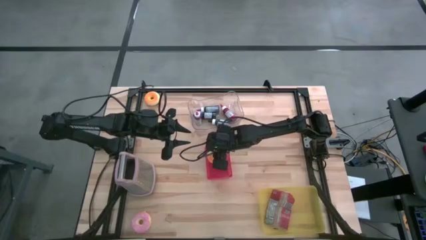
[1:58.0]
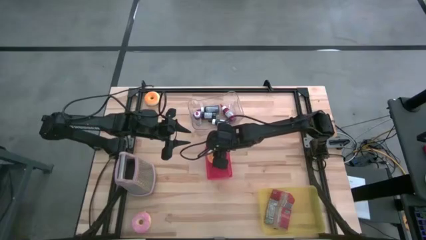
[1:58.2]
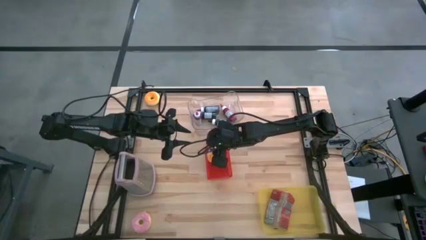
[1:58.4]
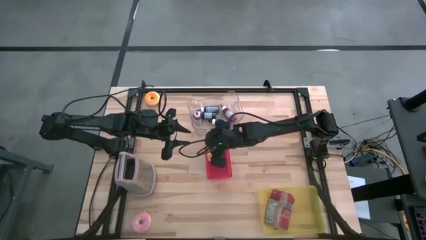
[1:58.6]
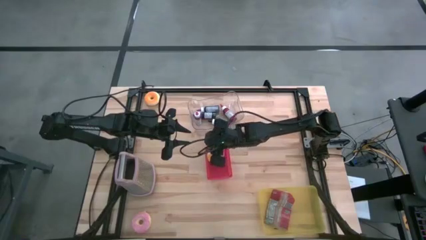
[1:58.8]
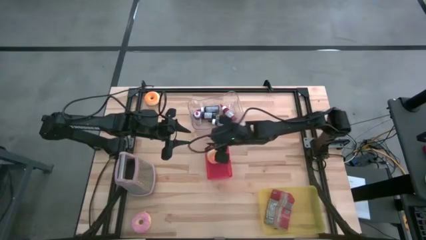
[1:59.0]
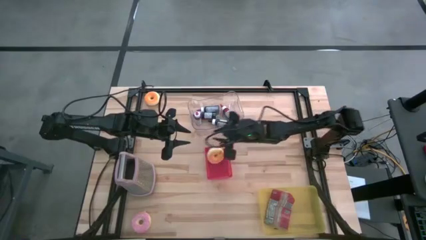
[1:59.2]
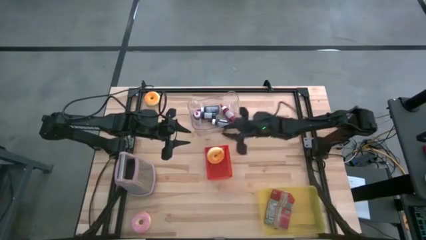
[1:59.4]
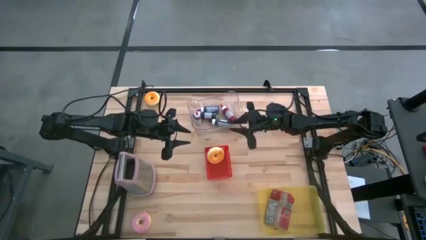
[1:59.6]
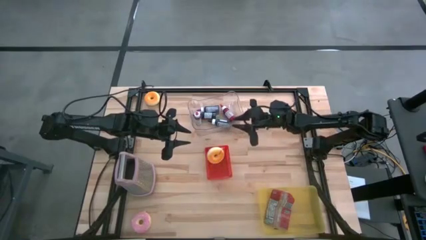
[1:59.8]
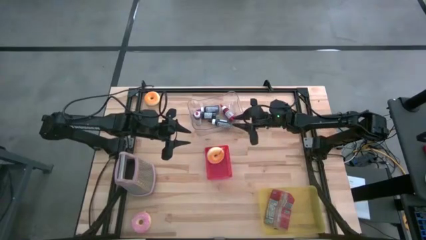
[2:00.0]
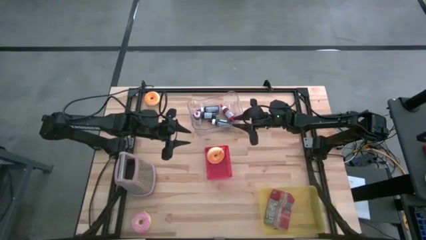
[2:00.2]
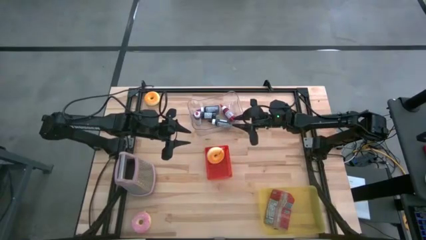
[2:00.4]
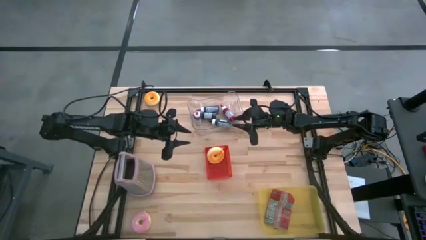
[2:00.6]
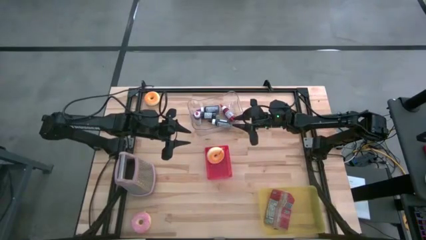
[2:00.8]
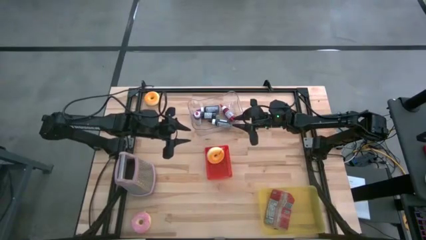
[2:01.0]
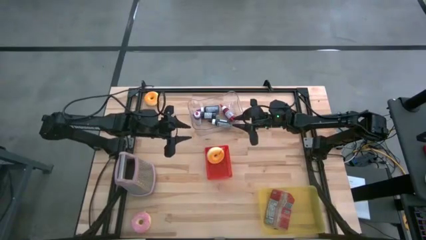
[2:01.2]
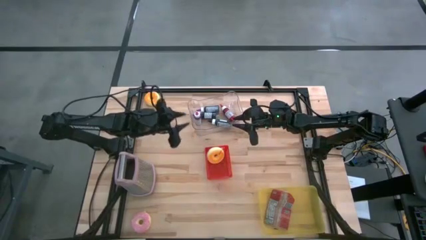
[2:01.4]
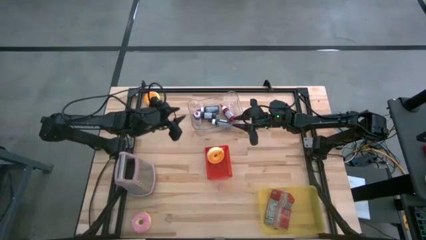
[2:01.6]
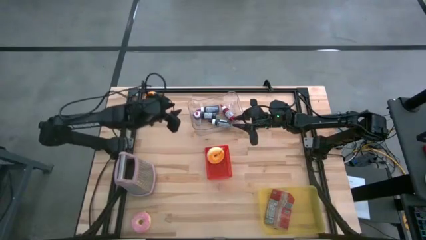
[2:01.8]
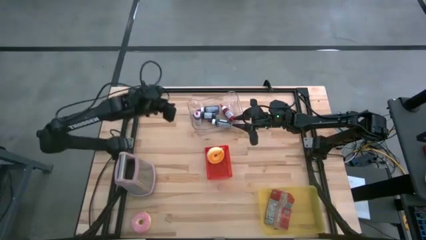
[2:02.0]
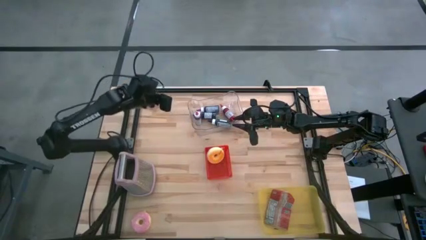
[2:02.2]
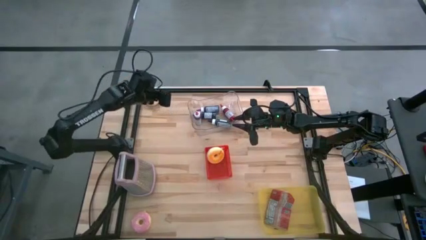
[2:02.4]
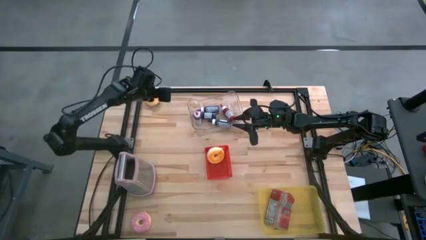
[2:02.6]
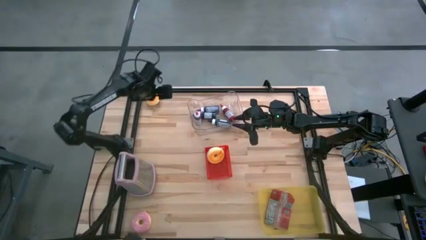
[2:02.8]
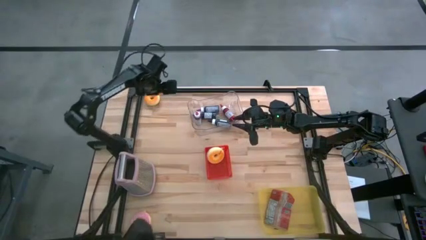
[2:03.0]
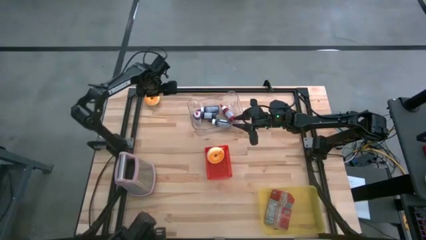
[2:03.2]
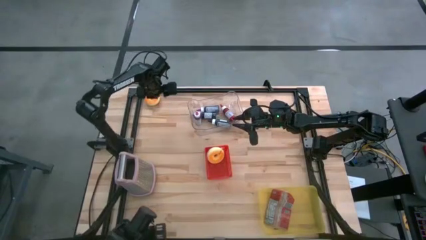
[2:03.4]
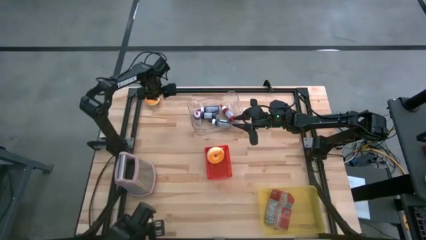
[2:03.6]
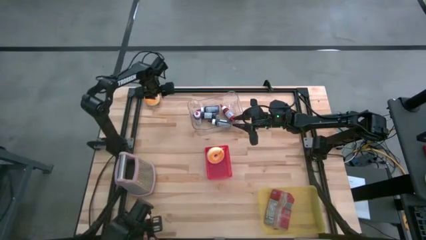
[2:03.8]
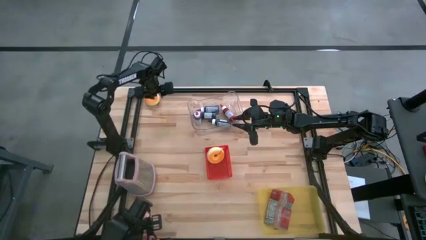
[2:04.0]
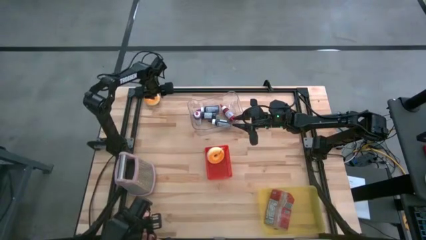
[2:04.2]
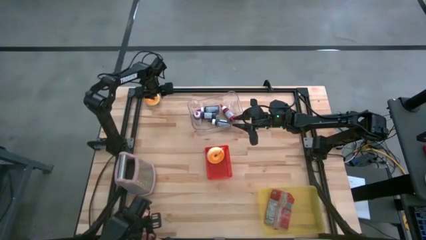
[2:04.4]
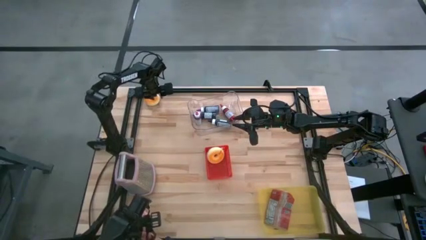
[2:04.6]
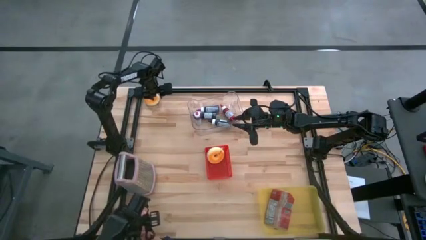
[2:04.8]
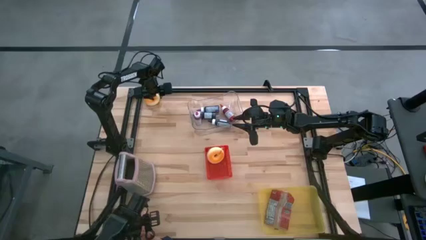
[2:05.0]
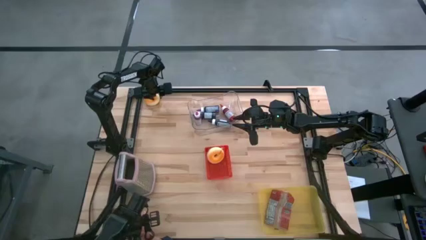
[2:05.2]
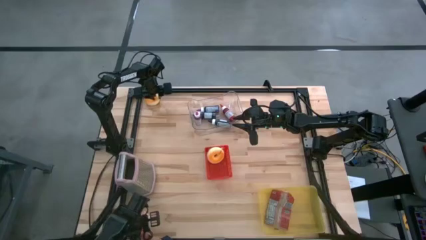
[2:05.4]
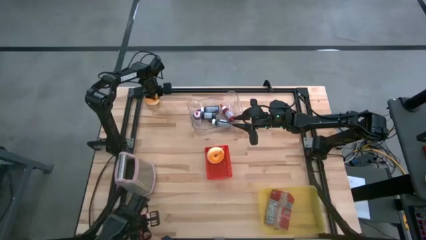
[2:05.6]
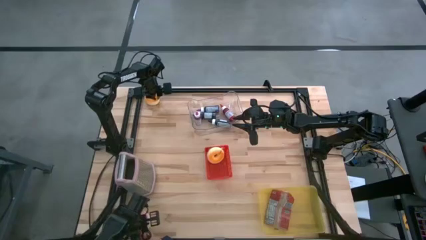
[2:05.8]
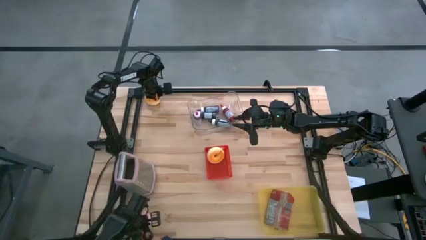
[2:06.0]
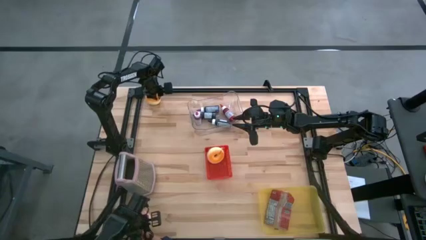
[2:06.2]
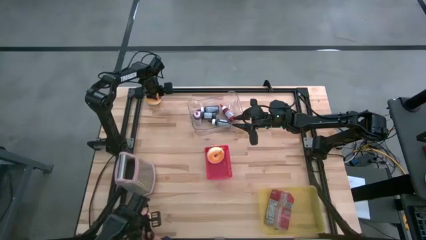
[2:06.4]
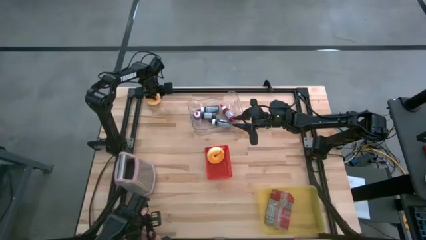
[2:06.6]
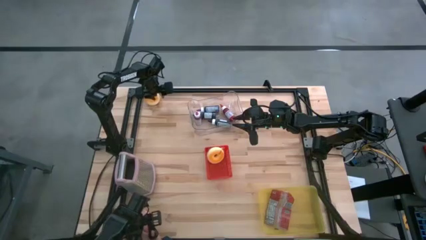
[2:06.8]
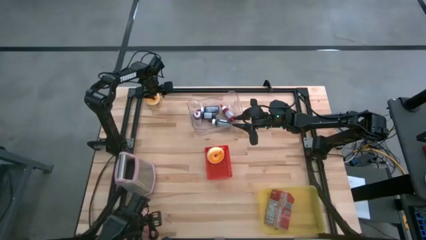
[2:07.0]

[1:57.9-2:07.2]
Task: Pick & Place Food Item
Put the black donut into the red bin

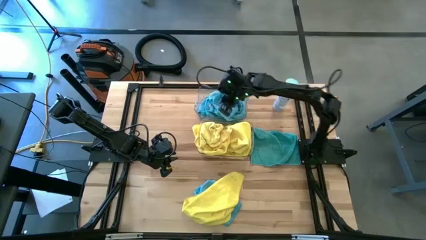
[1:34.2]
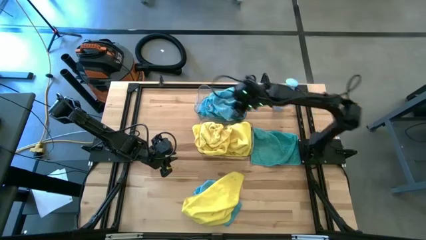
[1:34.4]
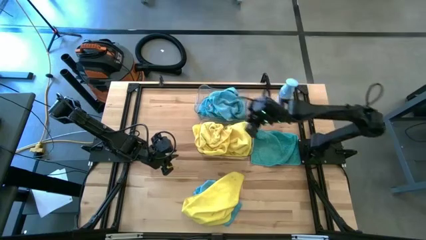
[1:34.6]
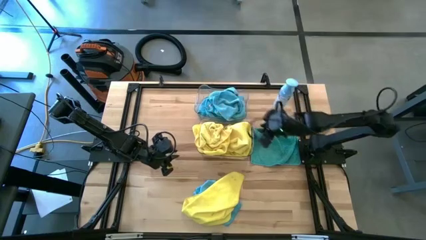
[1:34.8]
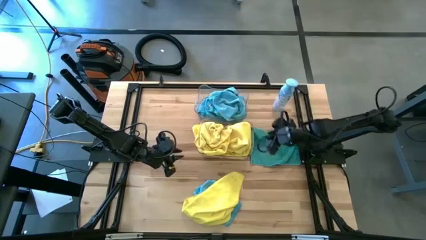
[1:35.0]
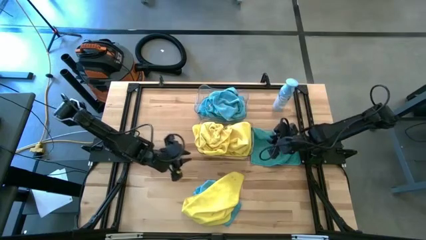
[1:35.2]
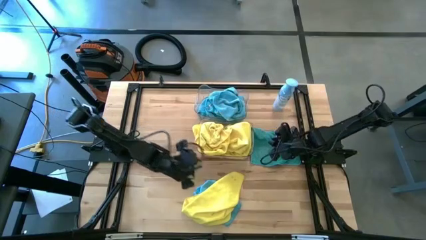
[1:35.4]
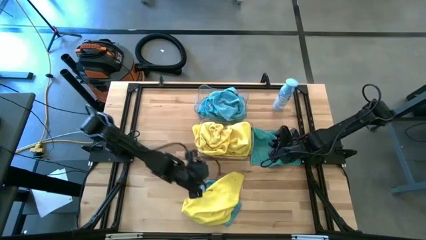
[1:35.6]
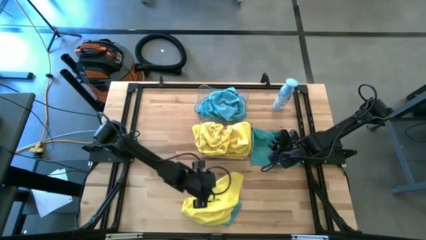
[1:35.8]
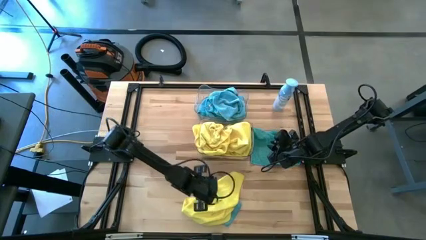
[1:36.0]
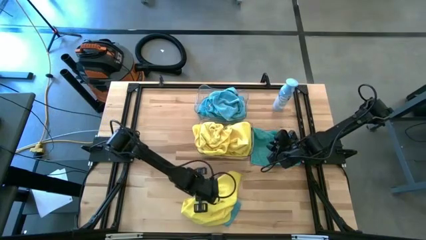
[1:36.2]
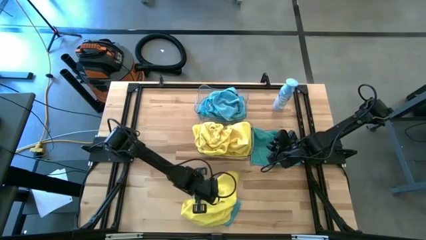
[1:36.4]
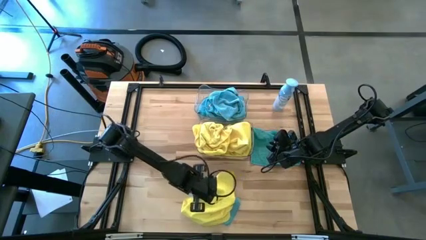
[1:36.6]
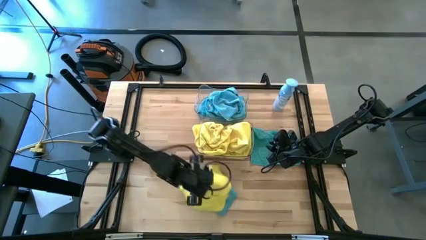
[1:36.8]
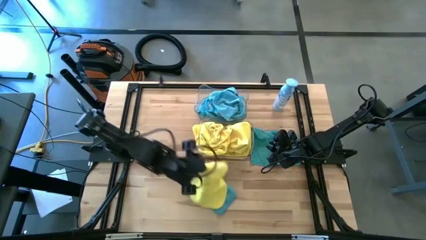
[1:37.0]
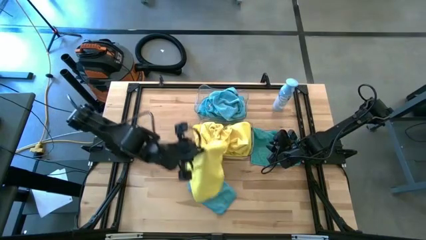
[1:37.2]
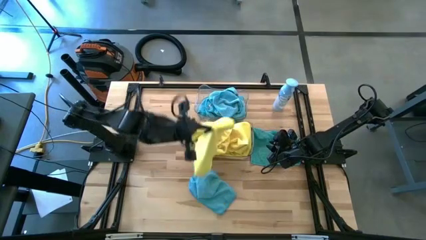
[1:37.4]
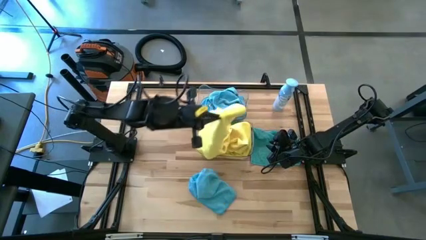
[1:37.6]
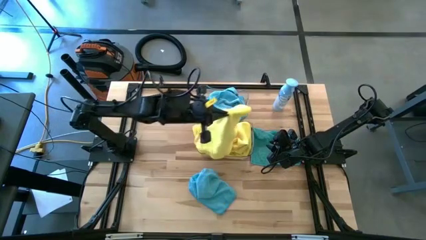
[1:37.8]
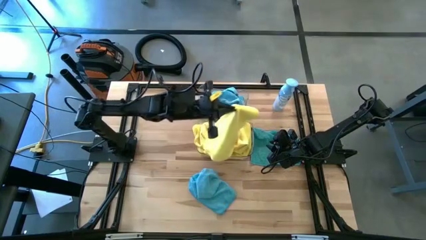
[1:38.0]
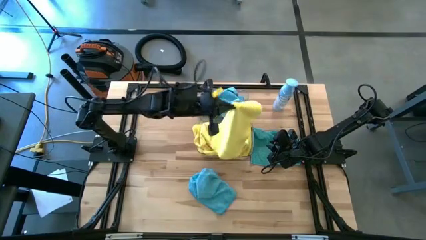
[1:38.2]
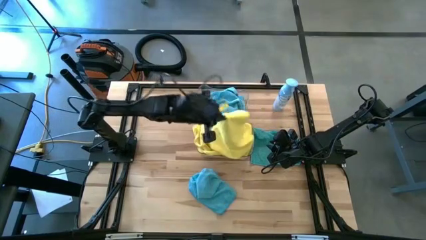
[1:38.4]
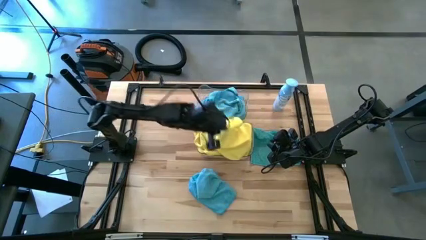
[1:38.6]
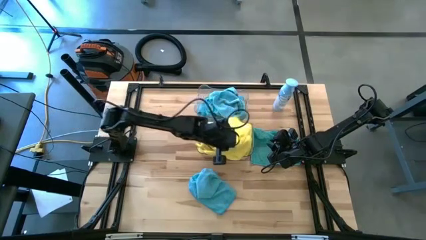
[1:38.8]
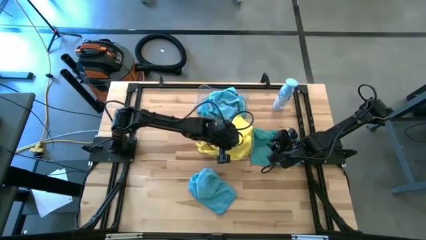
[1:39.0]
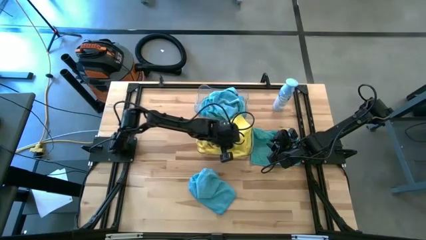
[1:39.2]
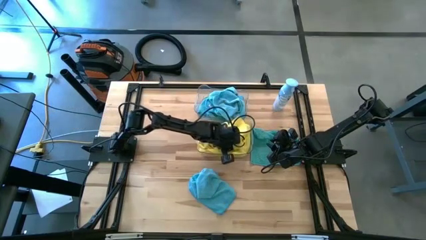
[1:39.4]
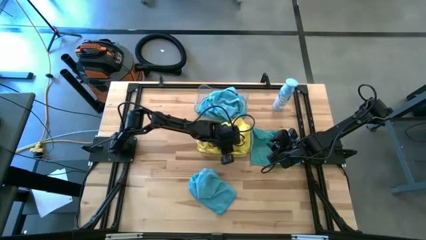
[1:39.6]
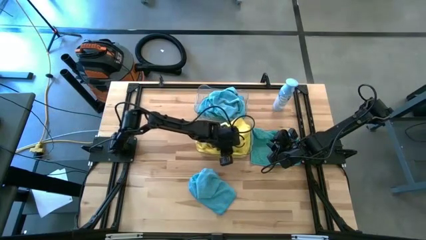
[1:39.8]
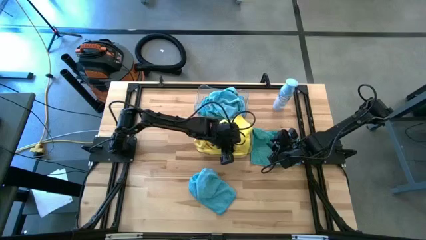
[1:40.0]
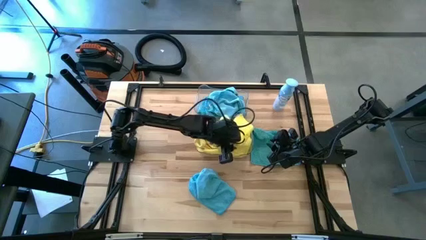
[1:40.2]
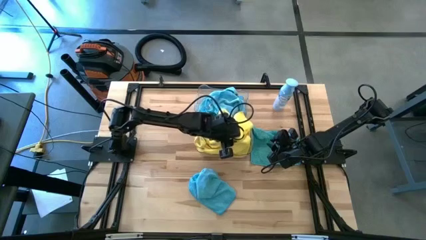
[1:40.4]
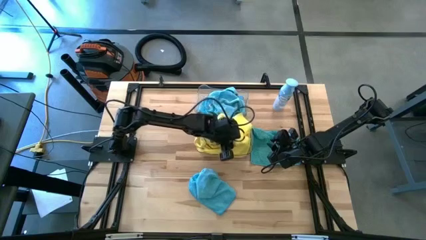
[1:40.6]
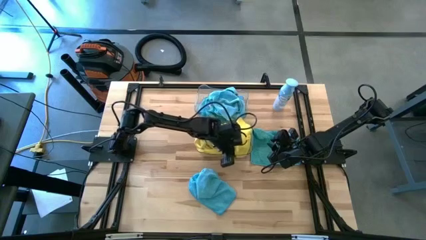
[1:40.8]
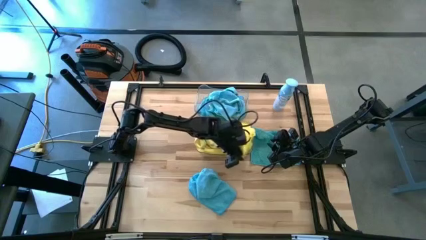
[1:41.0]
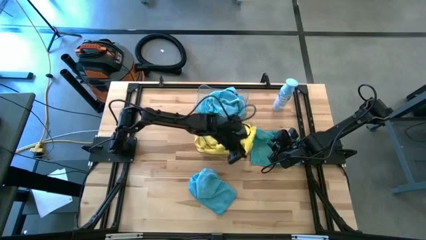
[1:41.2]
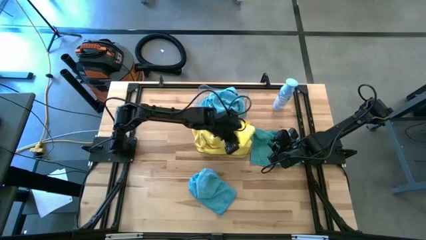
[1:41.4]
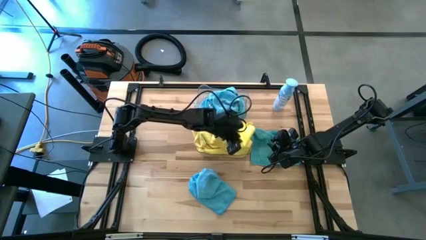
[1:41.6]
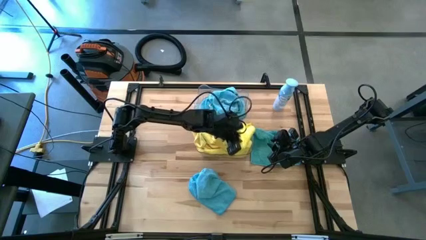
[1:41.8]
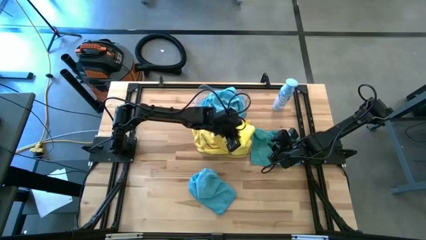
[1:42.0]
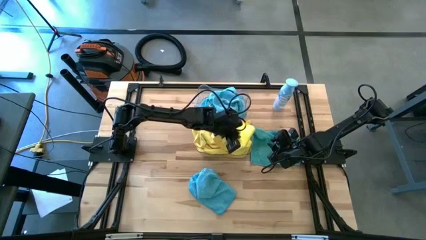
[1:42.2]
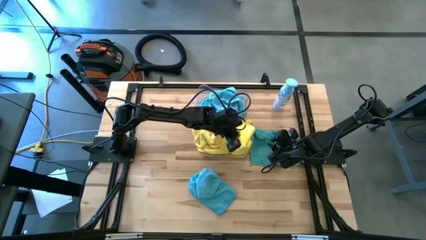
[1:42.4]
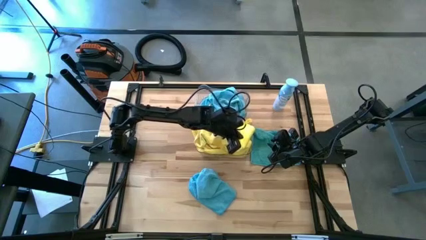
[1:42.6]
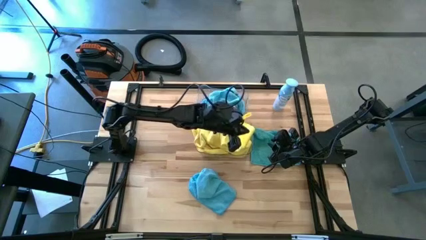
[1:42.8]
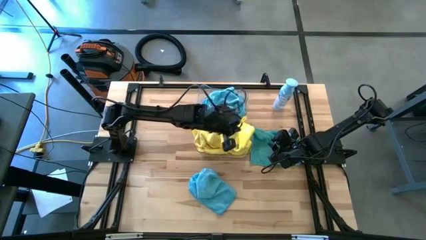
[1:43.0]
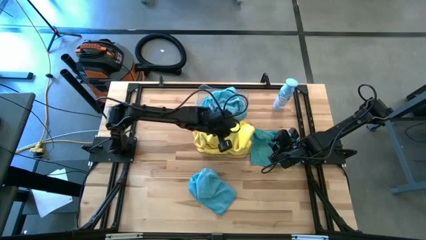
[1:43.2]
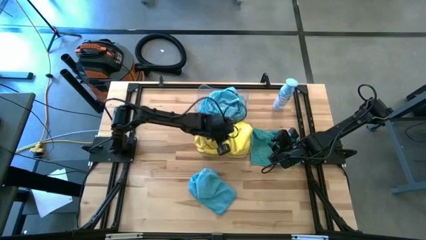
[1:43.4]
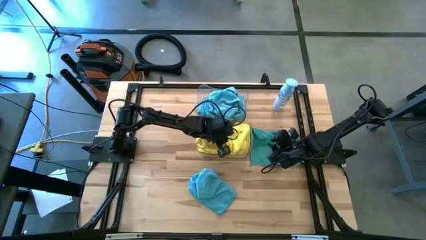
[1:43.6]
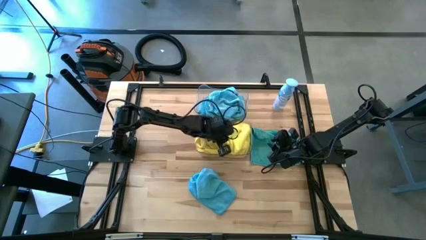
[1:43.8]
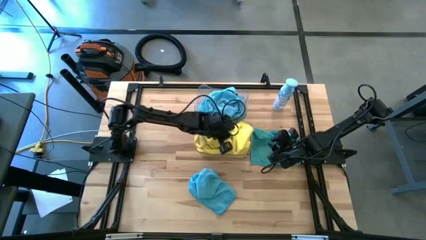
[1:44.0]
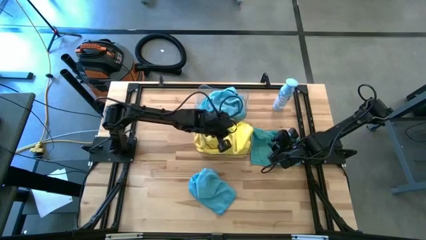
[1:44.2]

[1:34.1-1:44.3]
Task: Sort microfiber towel by color & place in baskets
Put the yellow towel into the bottom transparent bin
